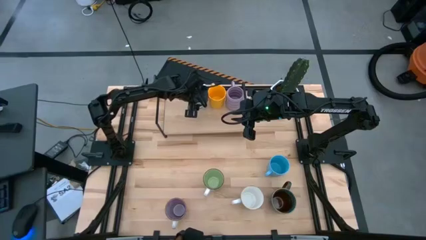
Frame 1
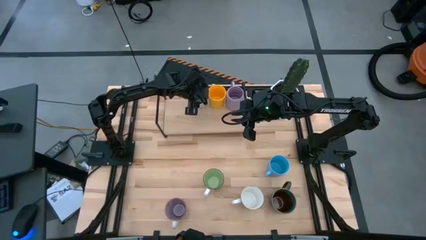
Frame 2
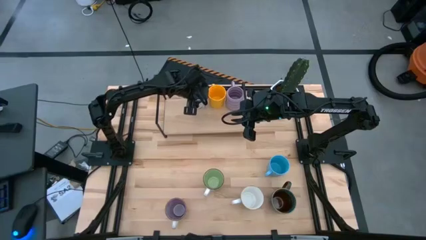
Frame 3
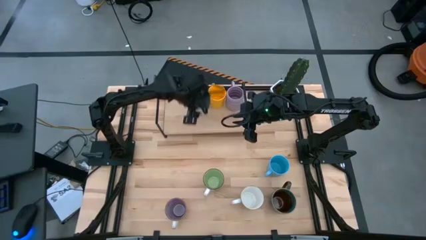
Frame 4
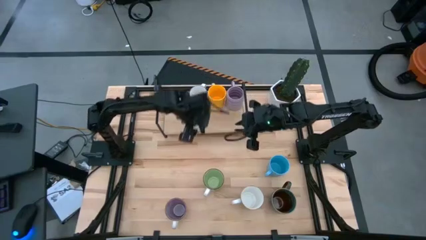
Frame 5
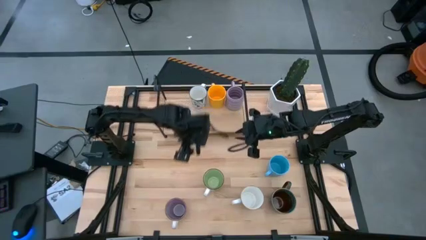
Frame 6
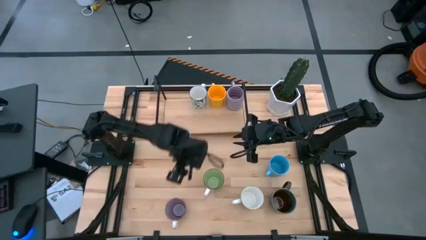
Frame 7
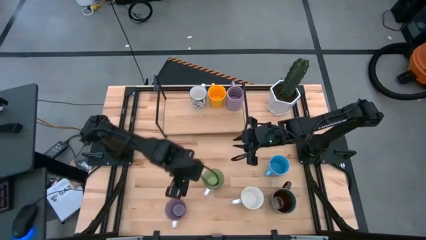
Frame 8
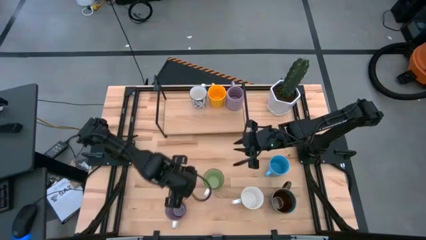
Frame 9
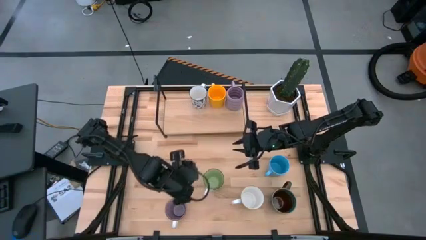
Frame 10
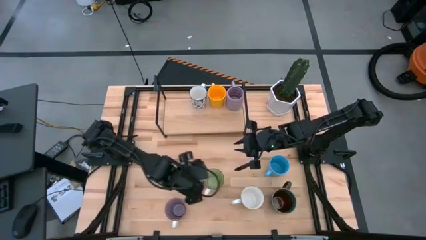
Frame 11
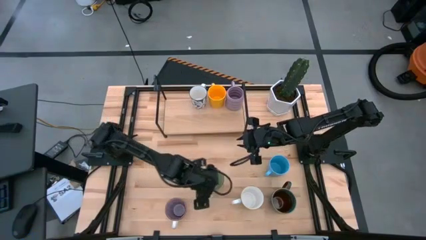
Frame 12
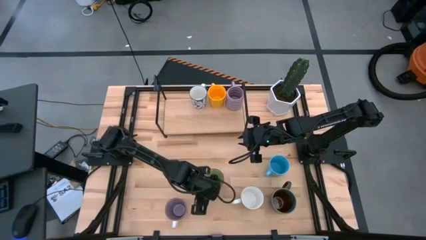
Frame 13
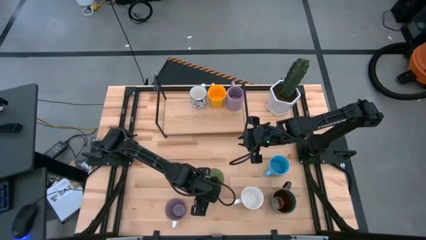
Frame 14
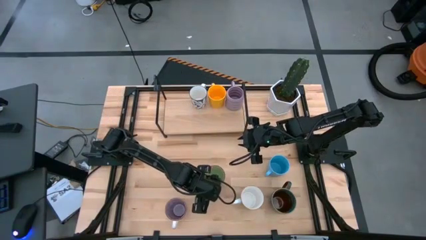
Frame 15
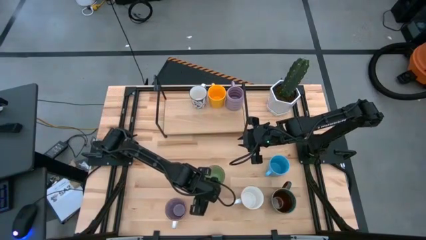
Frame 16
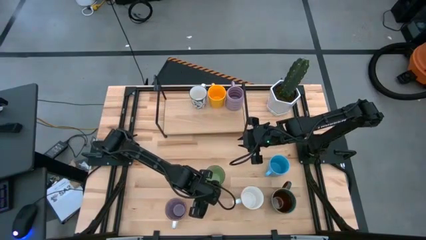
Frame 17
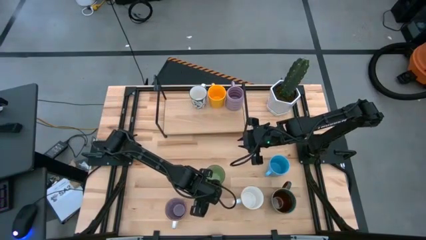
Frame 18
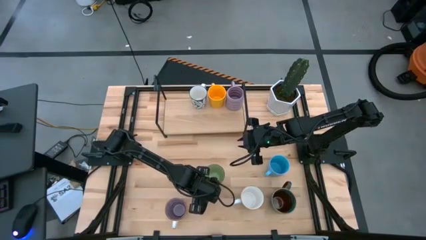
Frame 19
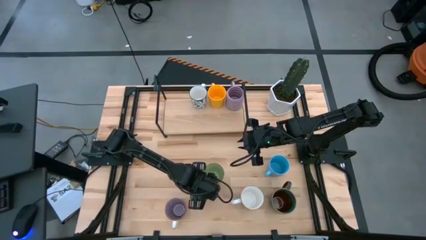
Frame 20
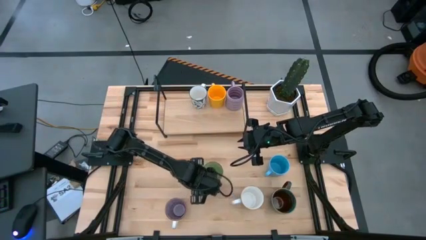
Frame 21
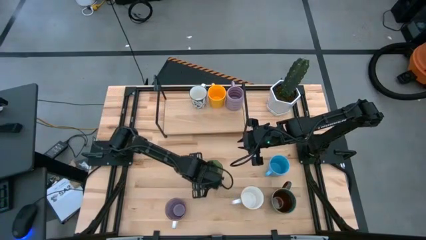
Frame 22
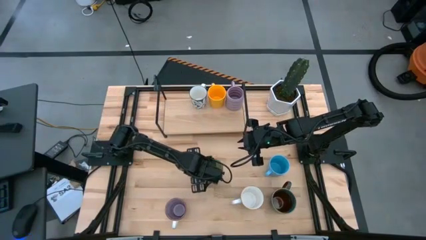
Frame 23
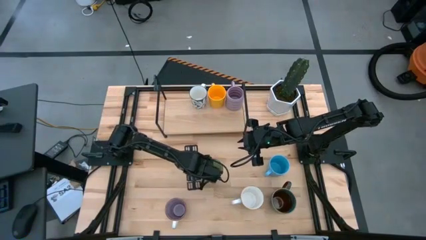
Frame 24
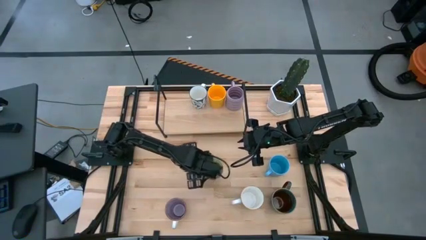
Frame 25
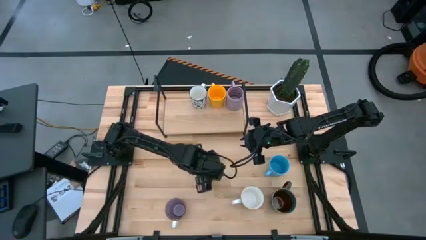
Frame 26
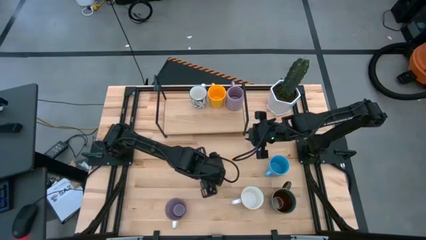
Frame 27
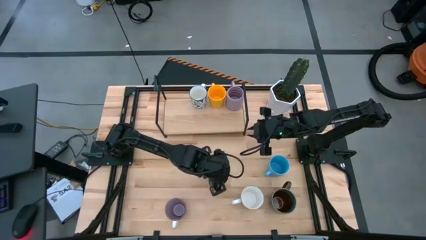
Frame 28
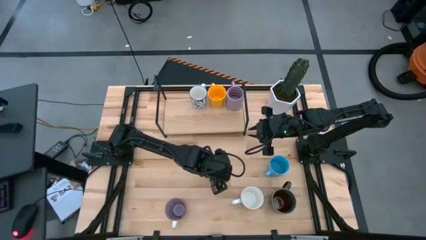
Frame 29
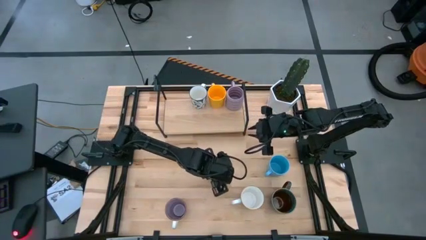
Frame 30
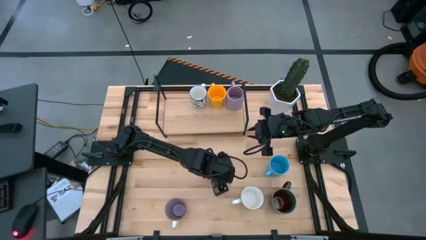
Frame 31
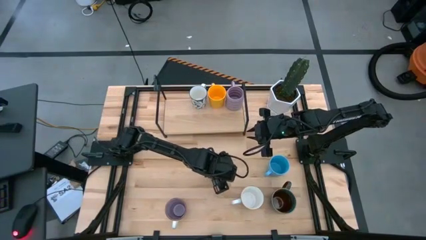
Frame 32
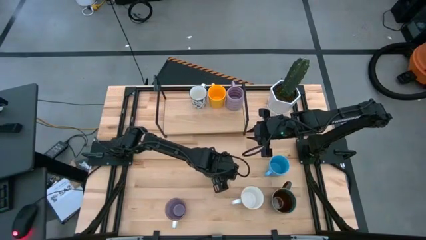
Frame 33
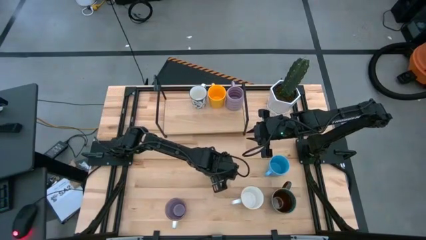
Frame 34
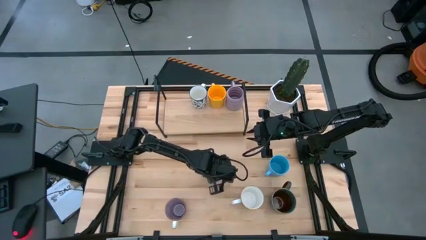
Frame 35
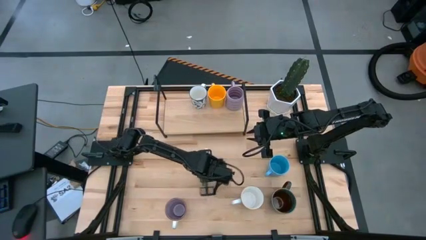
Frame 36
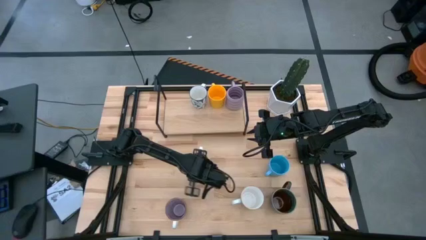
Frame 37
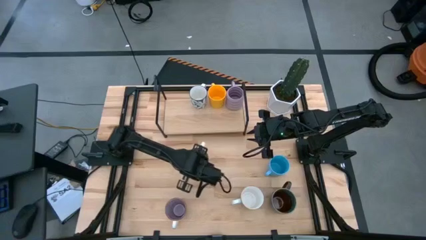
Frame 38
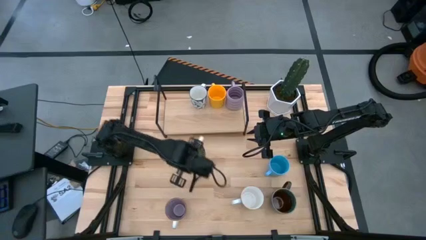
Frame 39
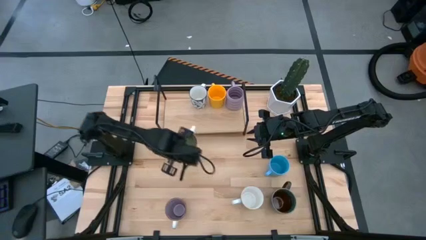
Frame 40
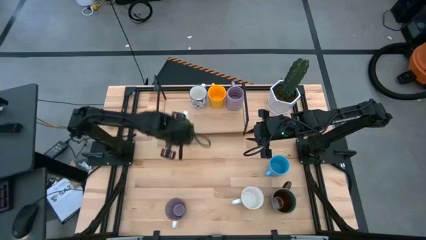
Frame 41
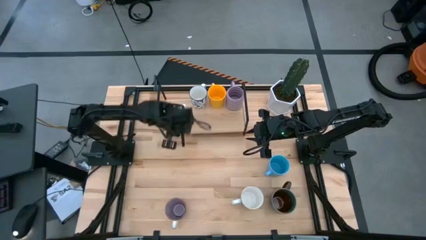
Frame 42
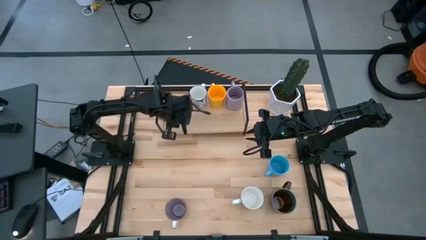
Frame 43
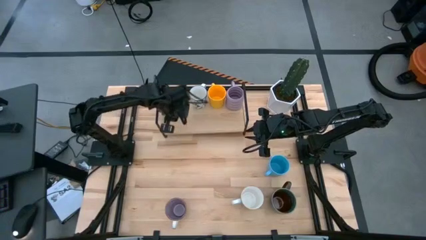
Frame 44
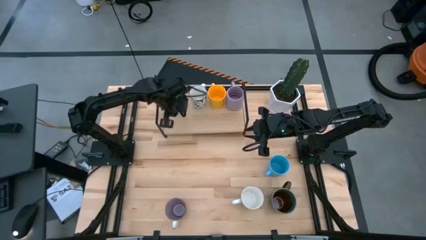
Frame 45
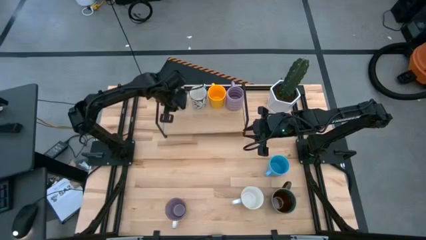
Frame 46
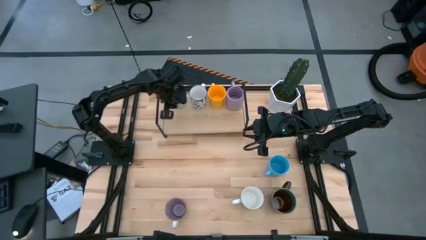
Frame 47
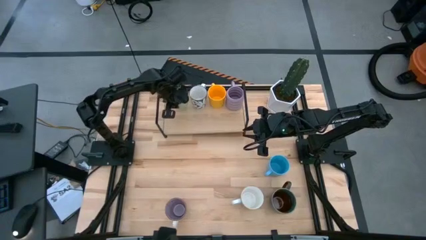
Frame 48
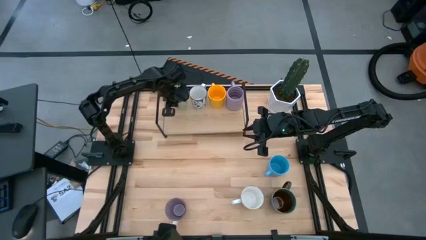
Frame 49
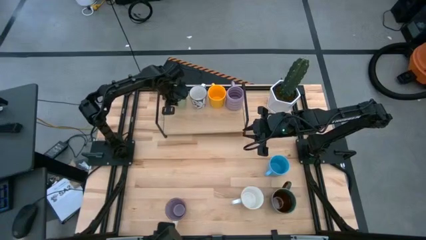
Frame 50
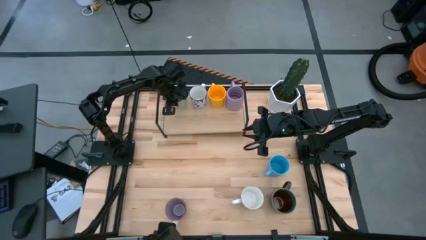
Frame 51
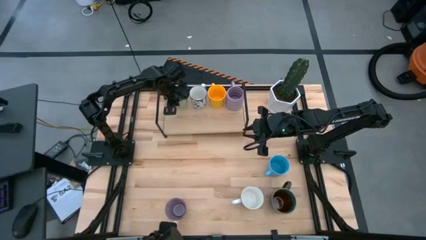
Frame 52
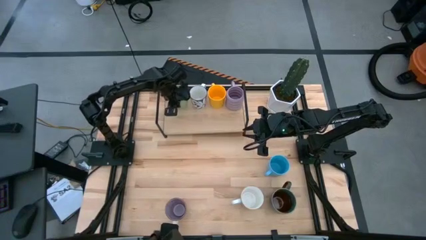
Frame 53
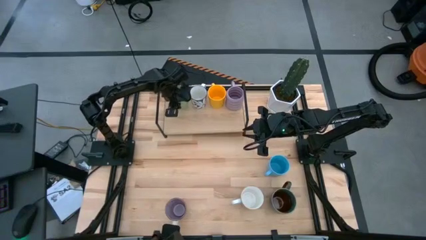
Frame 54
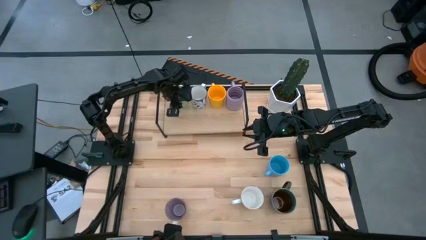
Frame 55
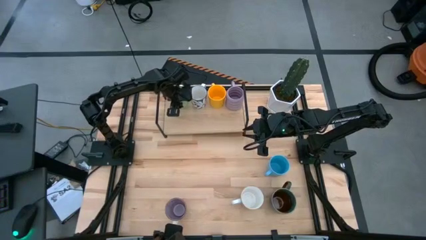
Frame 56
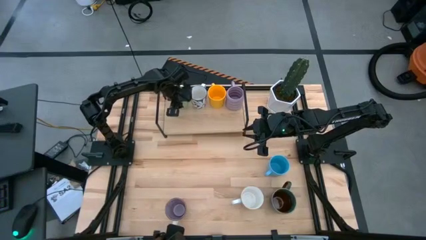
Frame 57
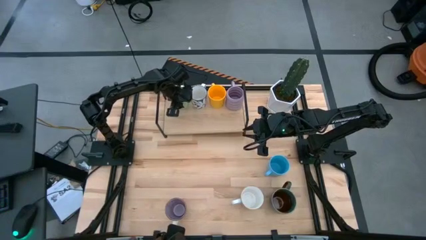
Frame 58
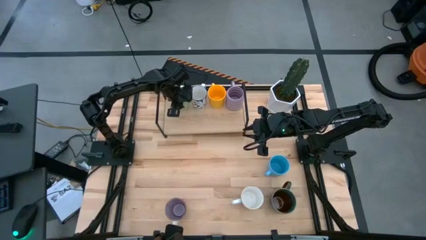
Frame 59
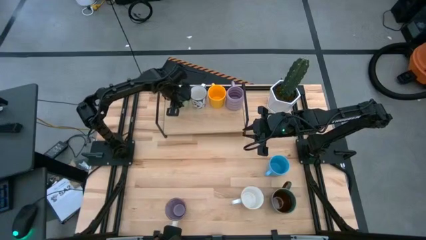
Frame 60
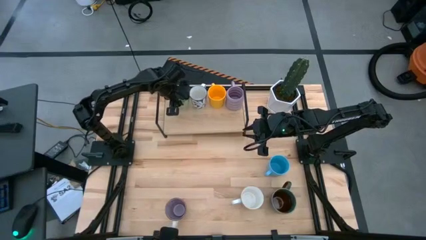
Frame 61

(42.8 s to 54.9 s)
Task: Place coffee mugs
Put the green mug on the shelf

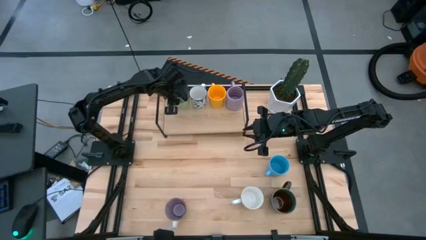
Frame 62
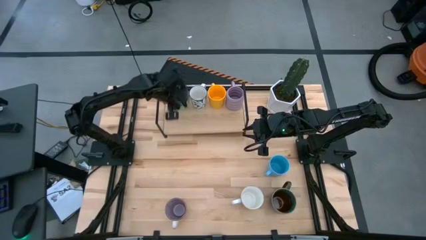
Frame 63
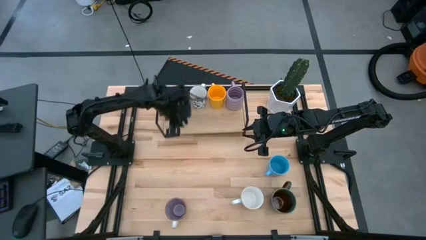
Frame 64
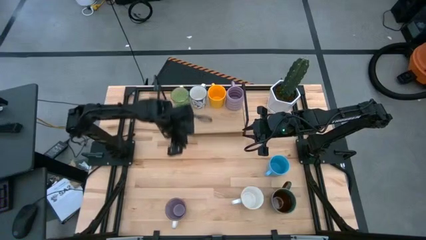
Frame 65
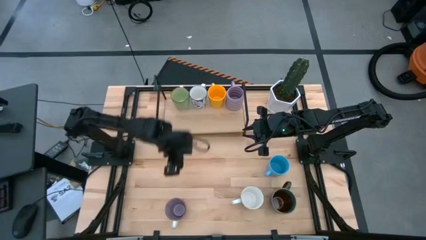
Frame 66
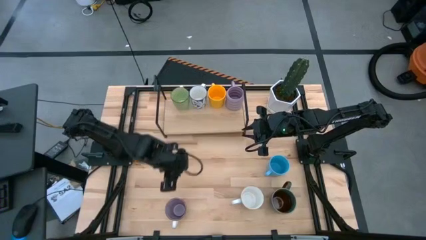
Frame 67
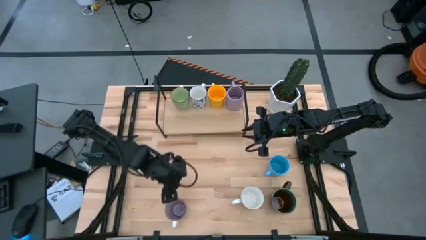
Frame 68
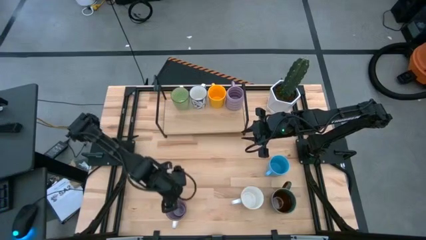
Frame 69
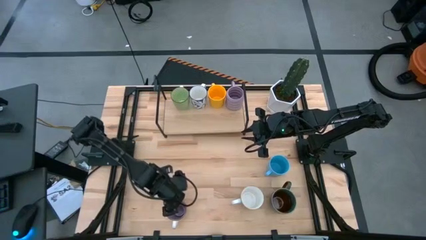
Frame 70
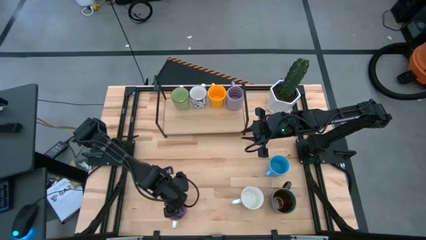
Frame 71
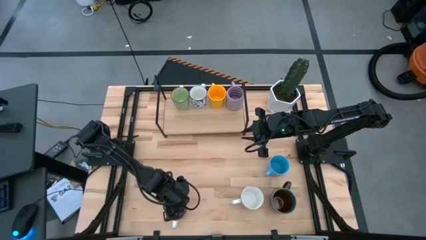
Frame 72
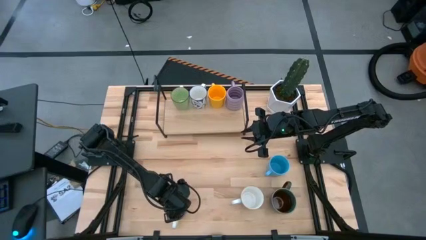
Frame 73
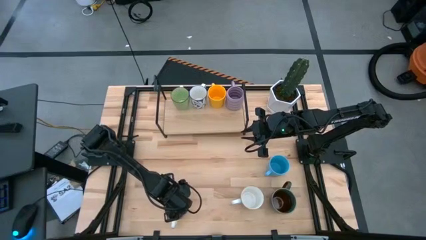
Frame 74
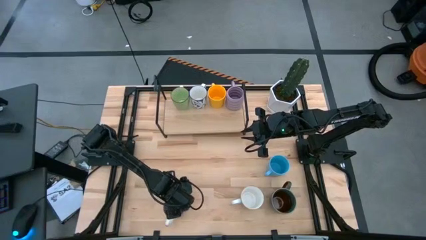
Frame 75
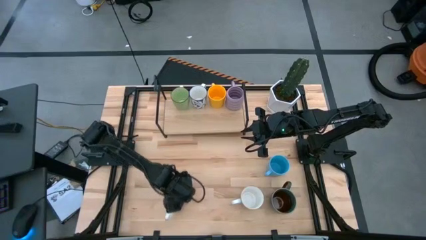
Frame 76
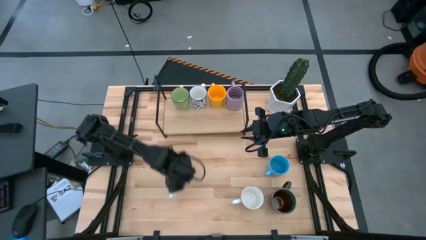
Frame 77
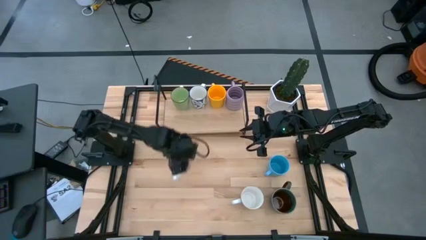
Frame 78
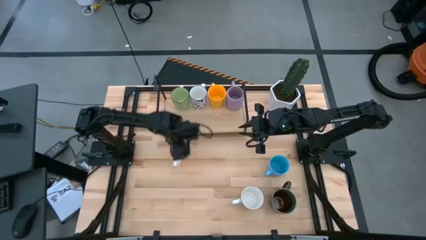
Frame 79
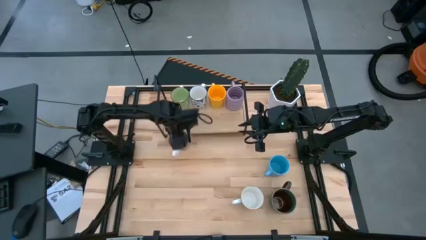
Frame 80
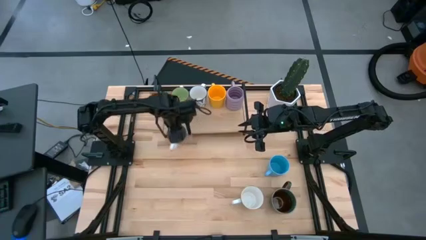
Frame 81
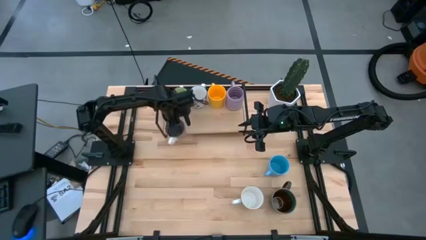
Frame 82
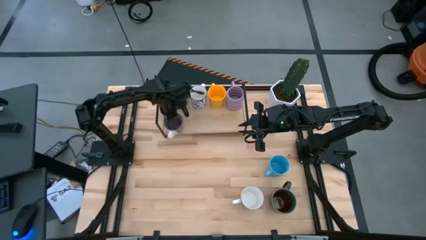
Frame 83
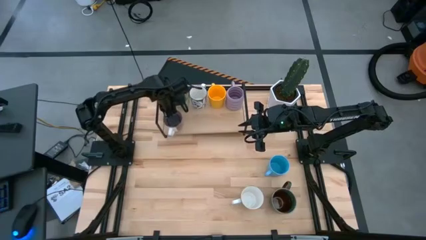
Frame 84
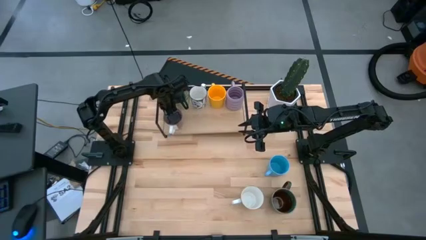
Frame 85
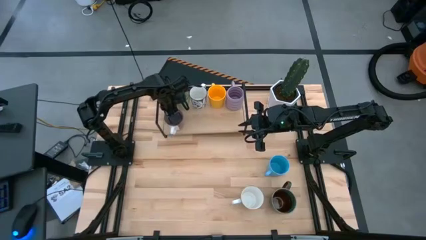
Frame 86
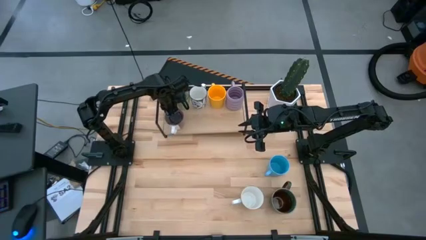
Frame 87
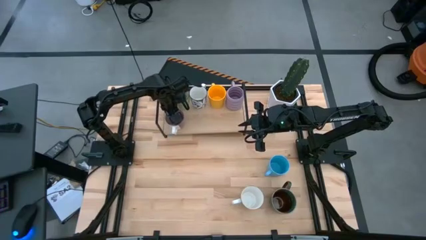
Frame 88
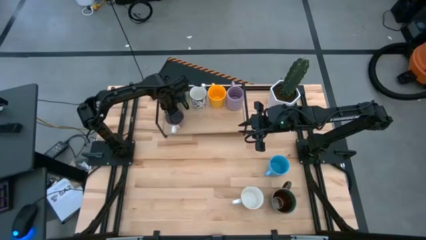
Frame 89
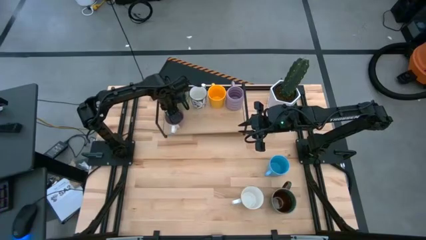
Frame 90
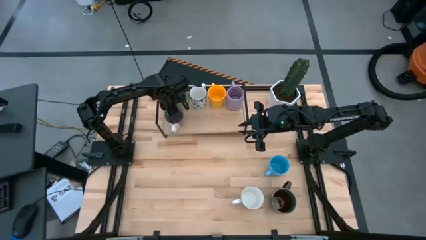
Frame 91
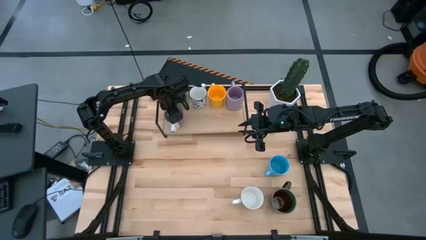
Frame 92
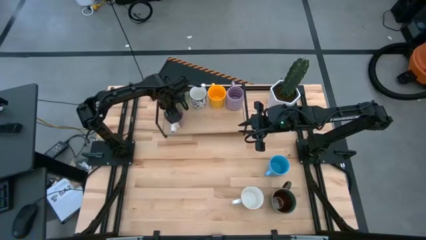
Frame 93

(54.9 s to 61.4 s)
Put the purple mug on the shelf aligned with the green mug
